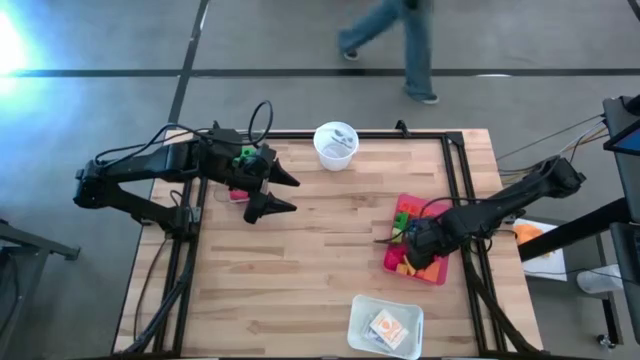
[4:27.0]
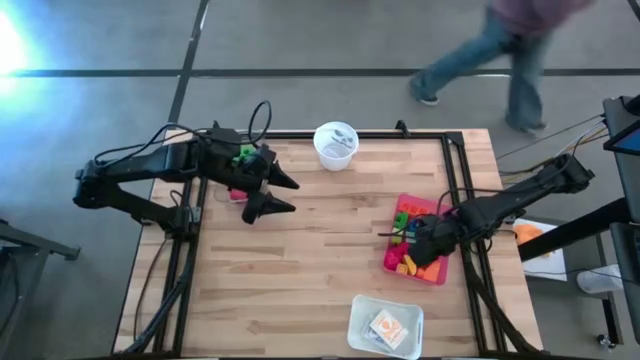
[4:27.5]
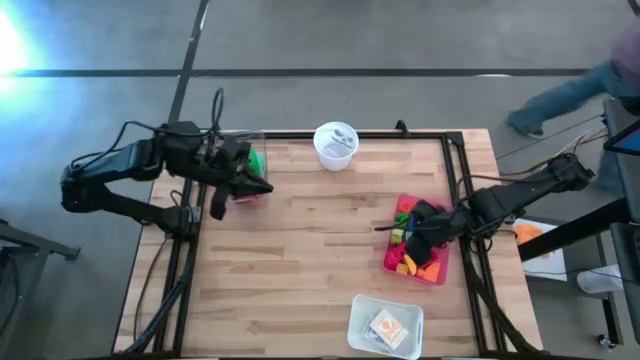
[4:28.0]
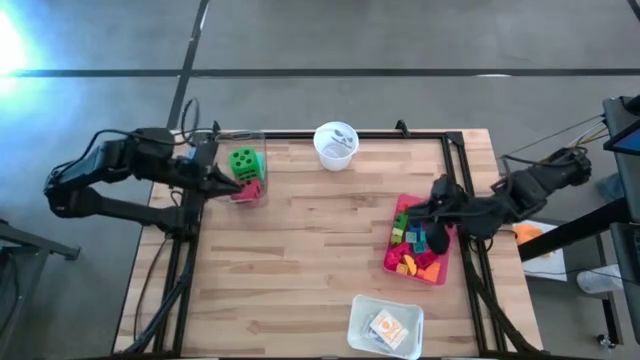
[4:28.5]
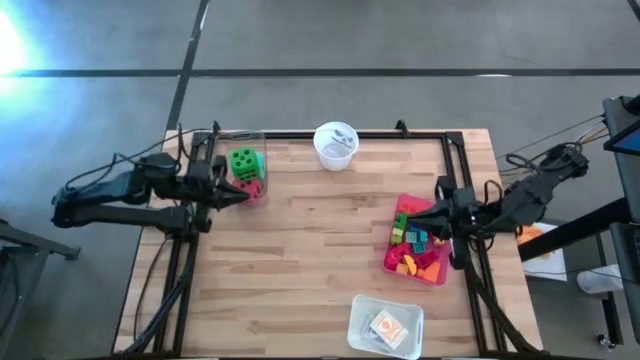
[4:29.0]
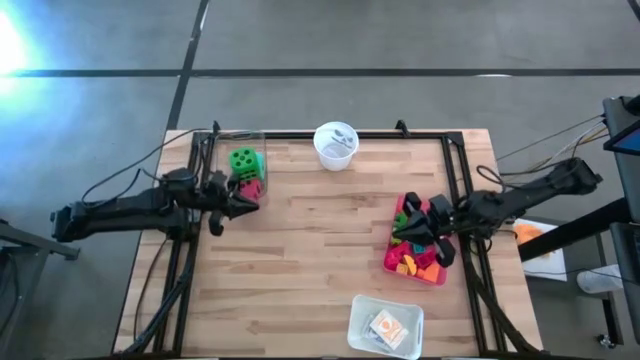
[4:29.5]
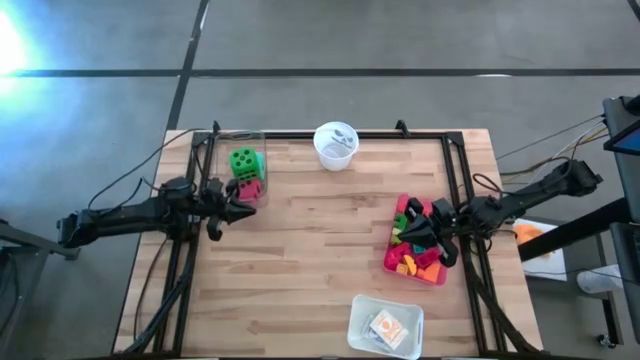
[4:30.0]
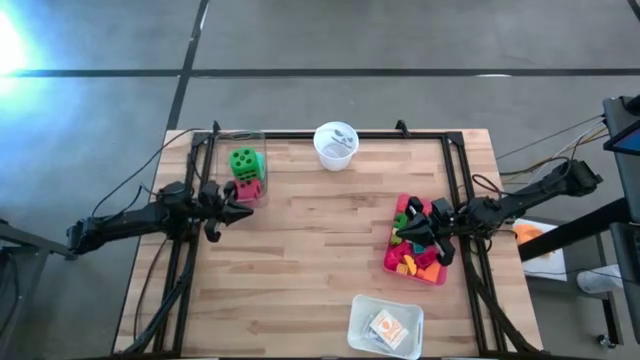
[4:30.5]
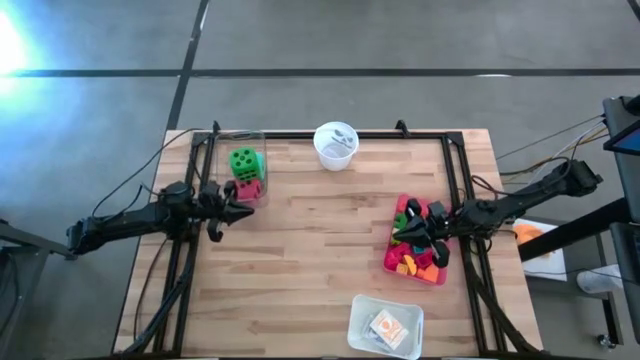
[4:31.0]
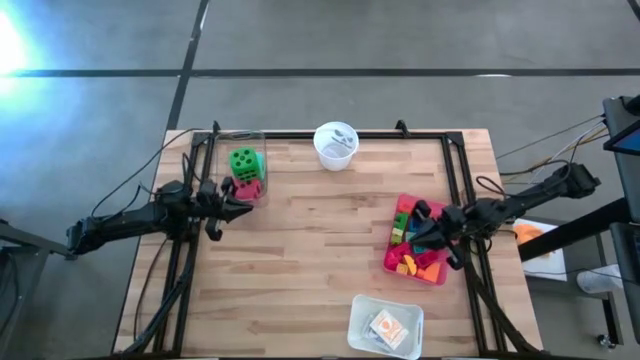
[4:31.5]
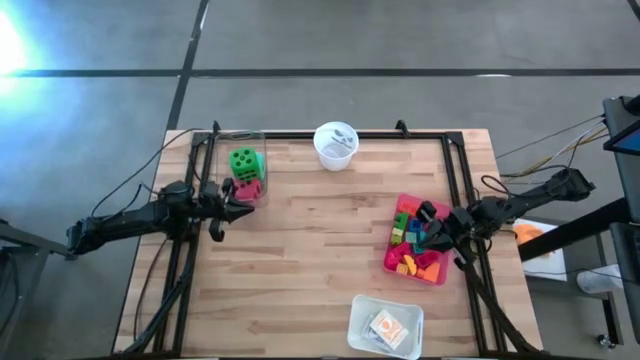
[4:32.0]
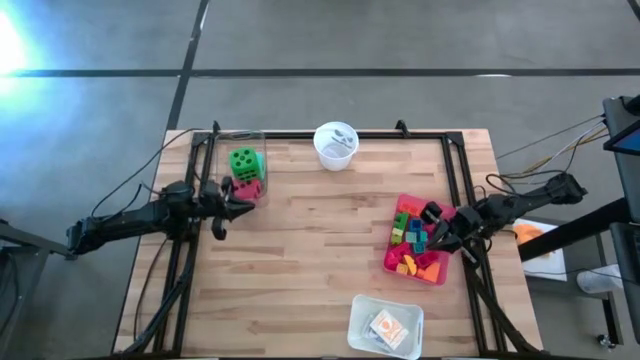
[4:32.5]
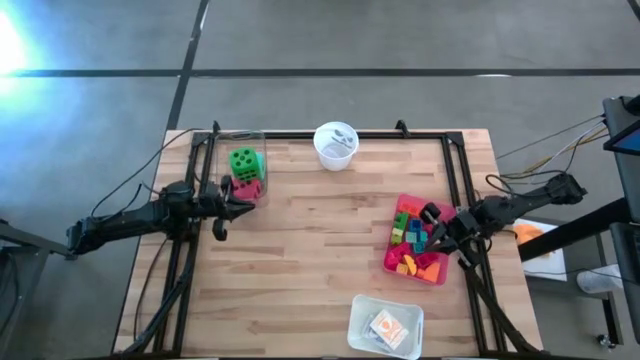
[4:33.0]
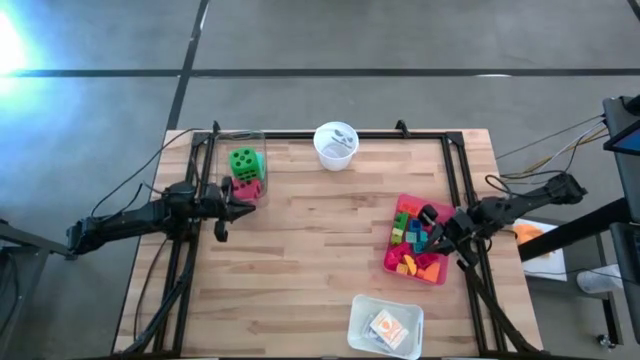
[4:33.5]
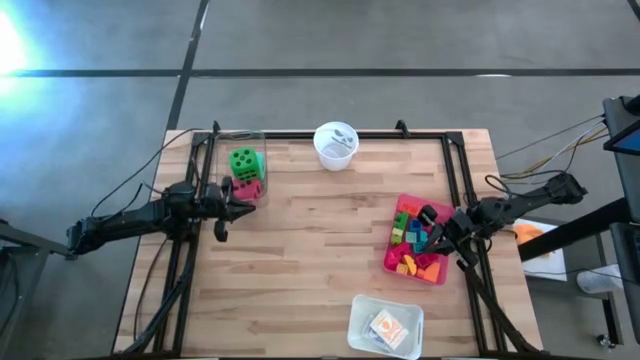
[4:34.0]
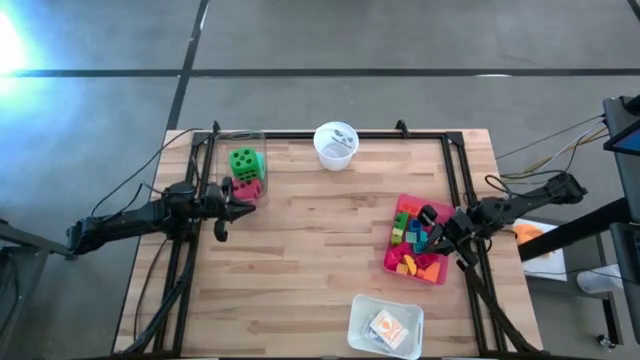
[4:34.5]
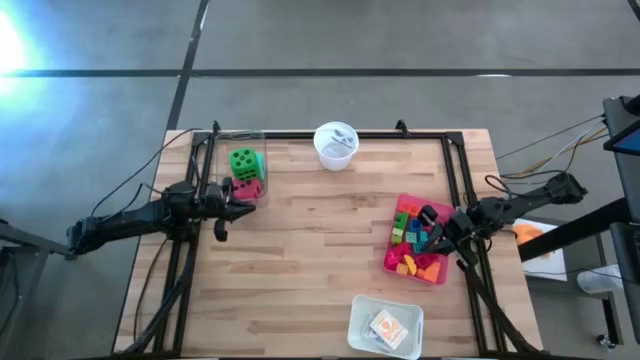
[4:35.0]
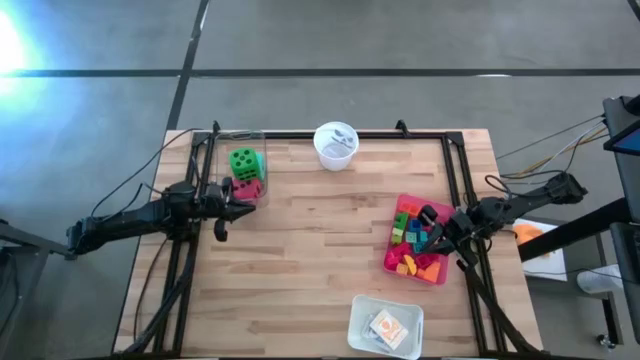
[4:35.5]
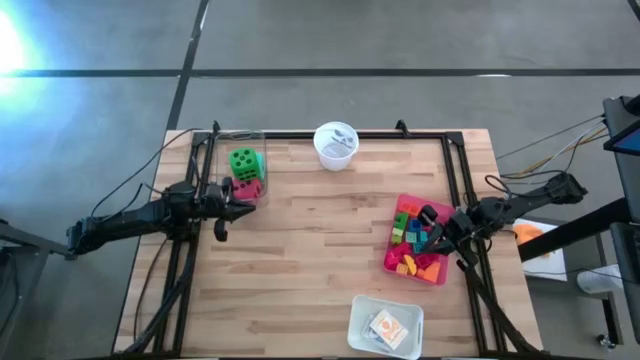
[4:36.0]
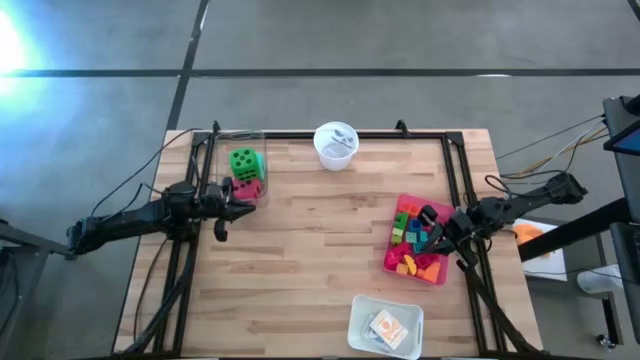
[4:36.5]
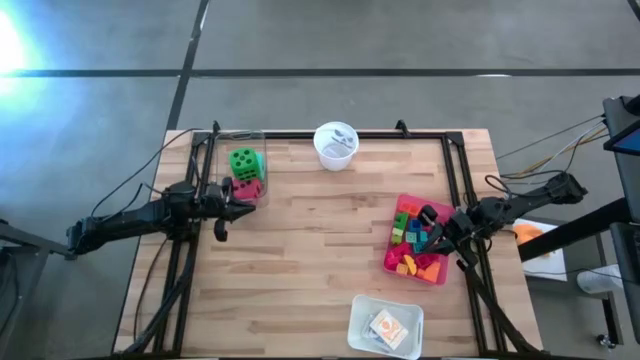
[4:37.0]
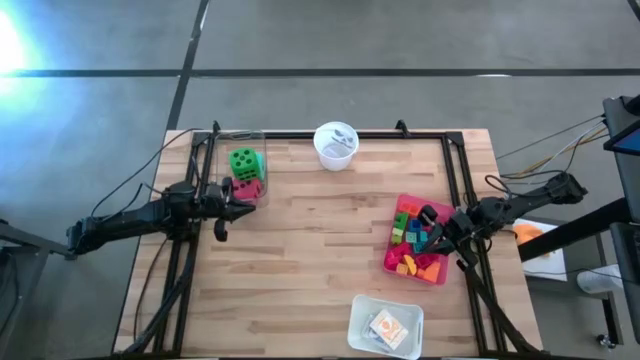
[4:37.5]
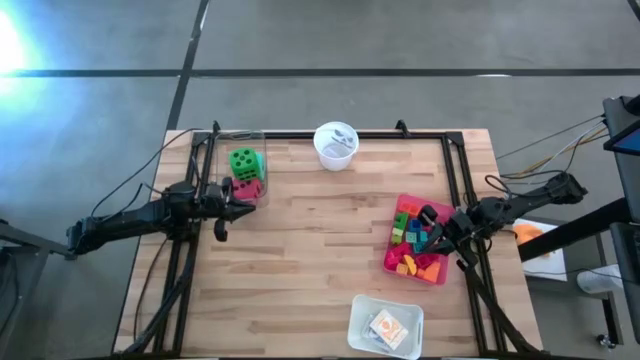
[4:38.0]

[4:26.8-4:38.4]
Task: Pick & Place Toys
Return to Home Position

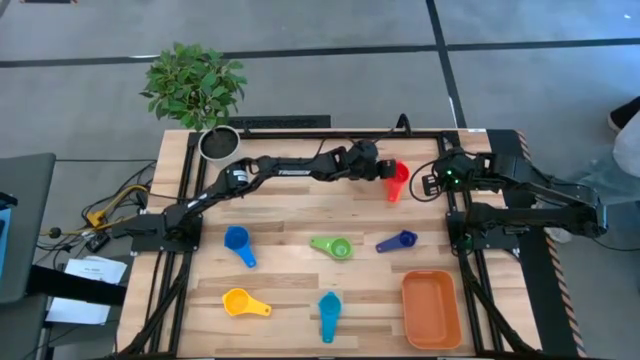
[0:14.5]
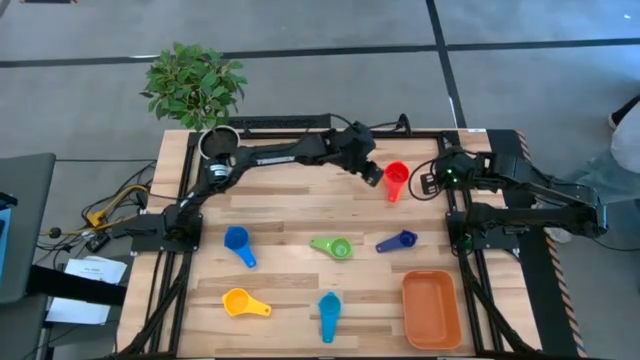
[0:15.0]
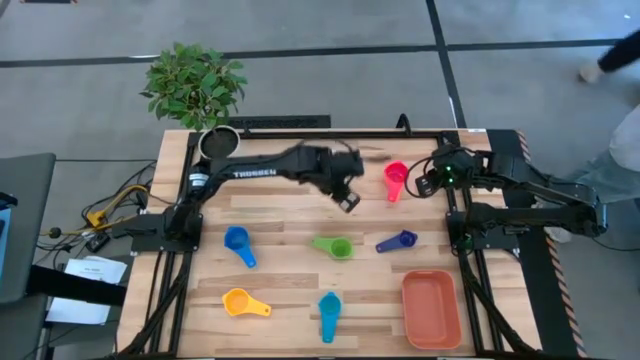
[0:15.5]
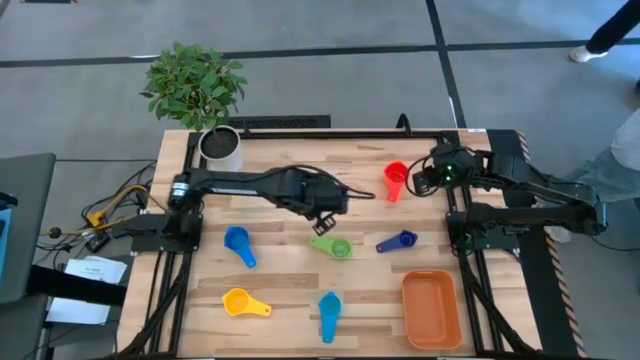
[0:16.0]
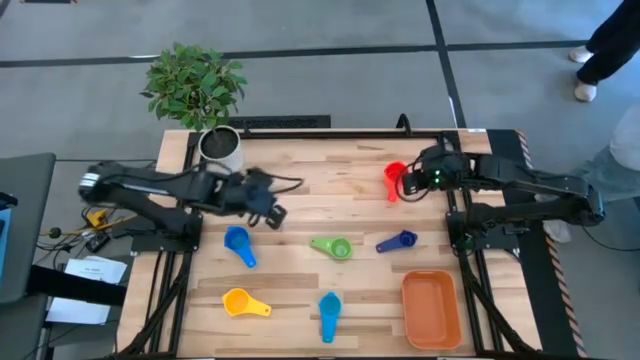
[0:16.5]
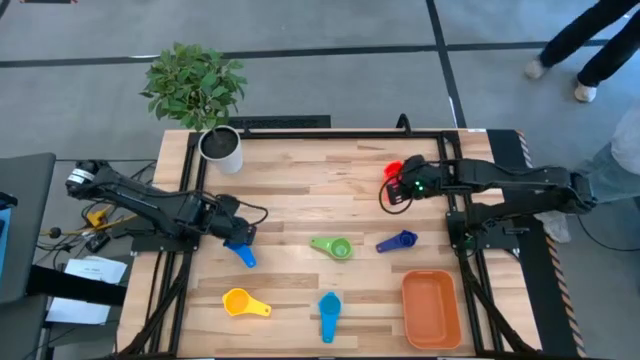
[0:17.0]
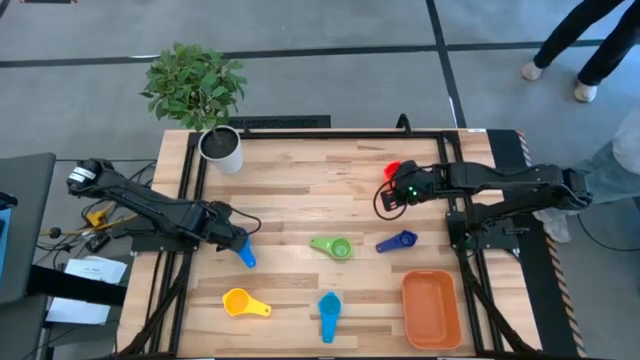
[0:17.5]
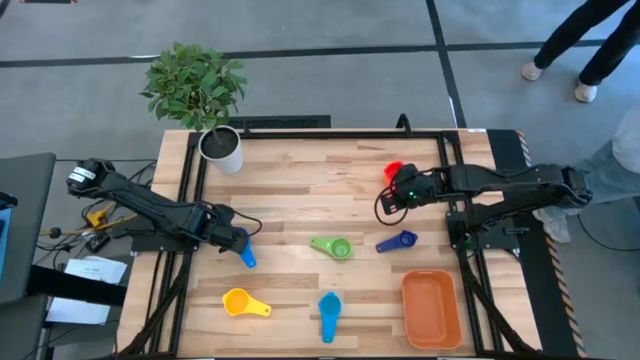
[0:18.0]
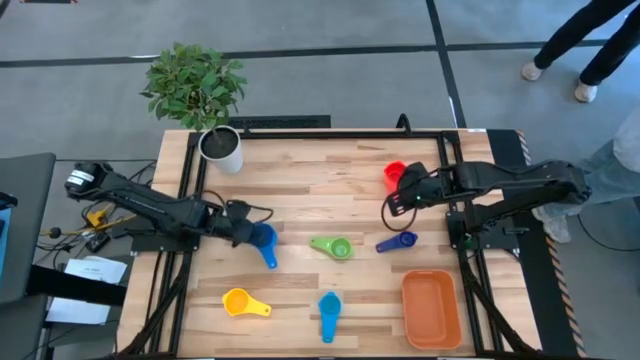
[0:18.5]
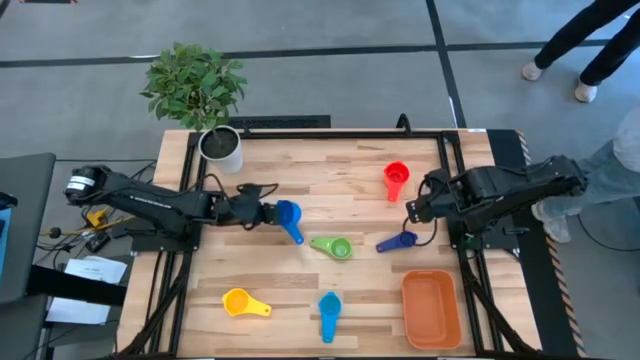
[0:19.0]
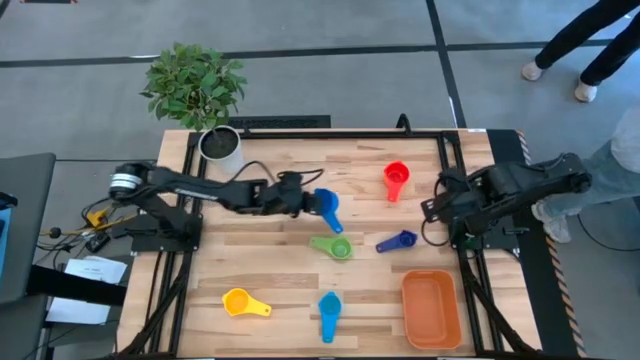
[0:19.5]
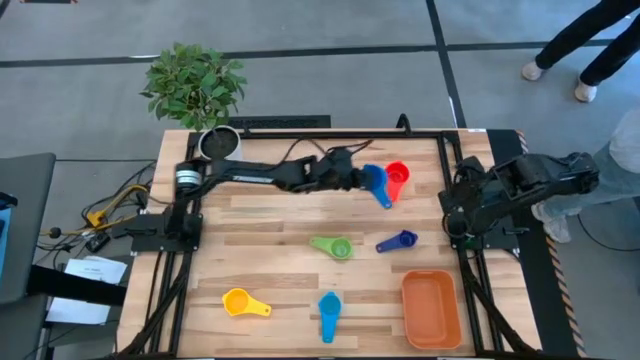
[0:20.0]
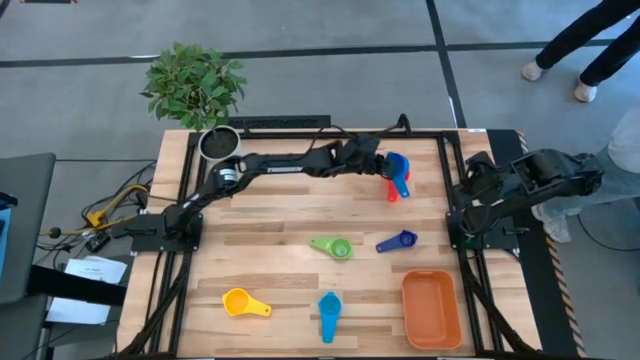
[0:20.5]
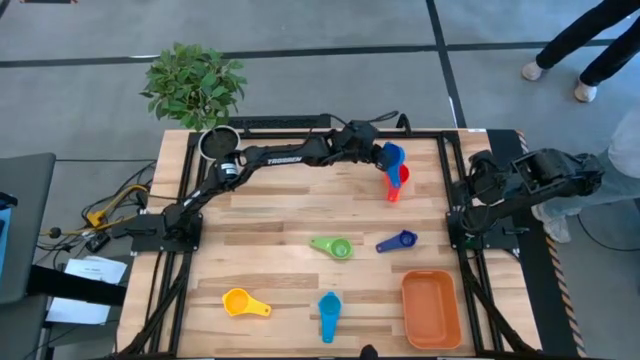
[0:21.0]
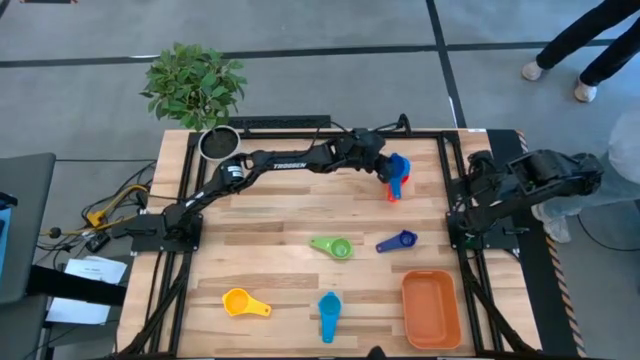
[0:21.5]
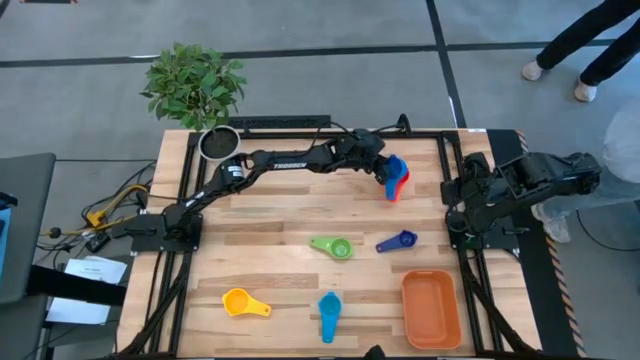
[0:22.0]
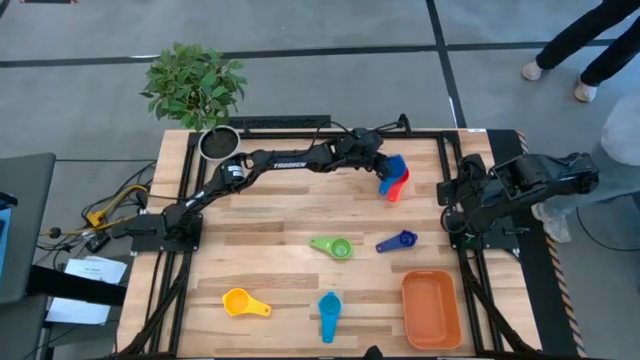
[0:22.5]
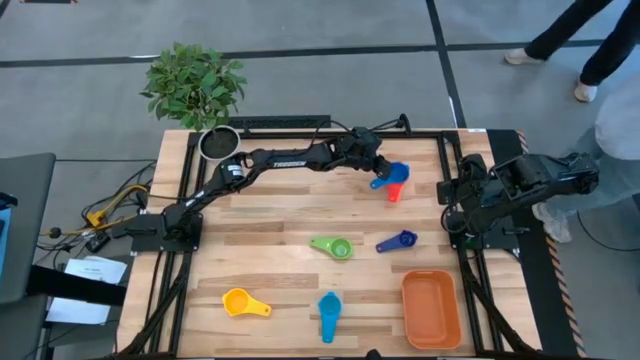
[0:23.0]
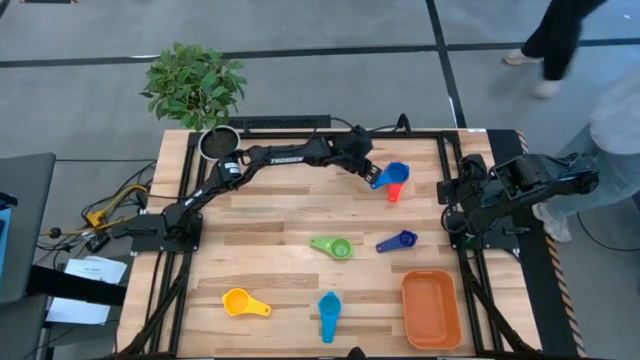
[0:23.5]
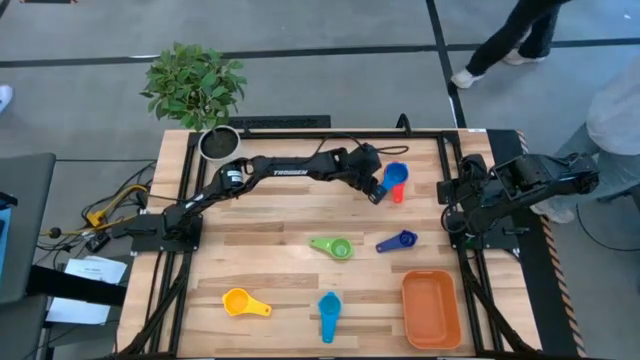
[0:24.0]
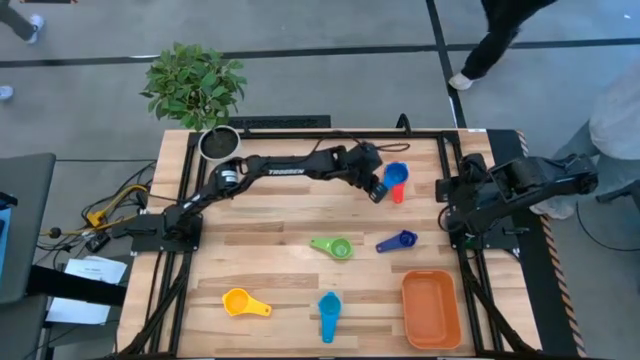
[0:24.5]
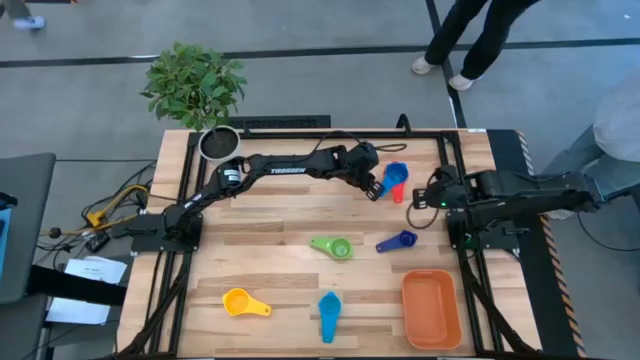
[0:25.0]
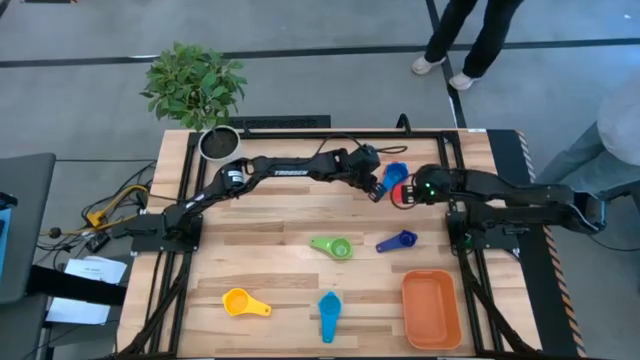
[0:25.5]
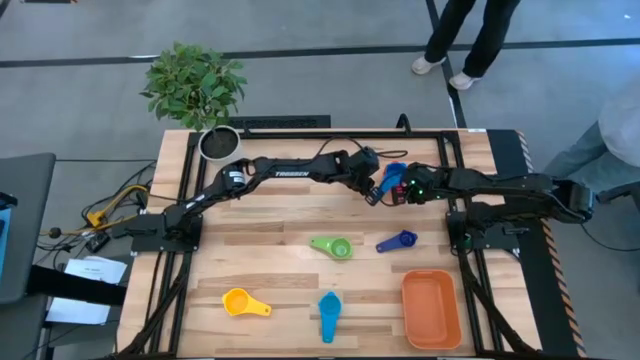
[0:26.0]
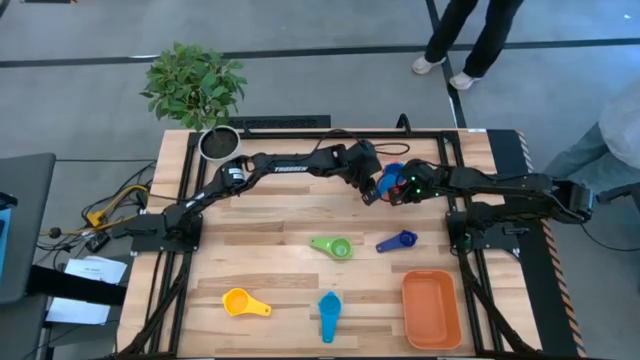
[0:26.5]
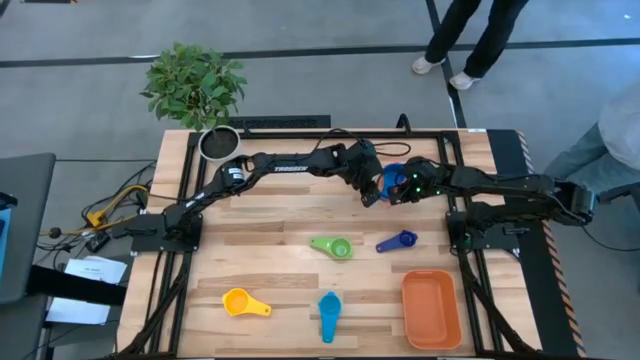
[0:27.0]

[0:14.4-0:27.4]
Task: Nest measuring cups in basket
Stack the top light blue measuring cup on top of the red measuring cup
